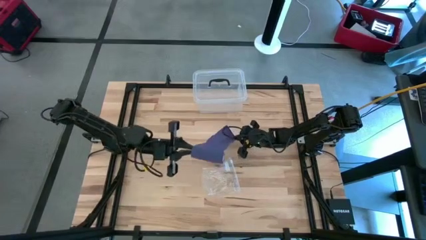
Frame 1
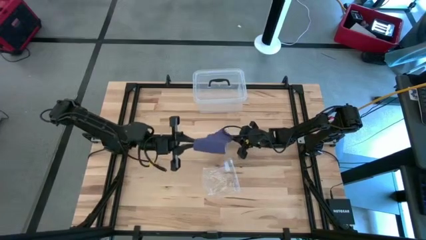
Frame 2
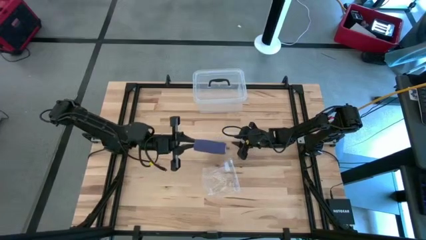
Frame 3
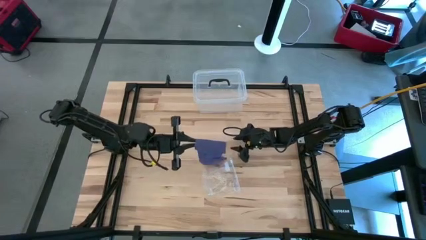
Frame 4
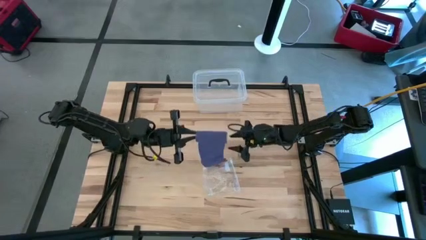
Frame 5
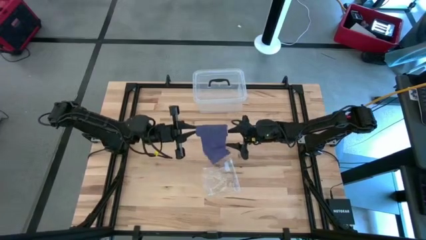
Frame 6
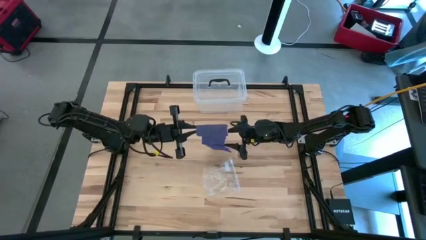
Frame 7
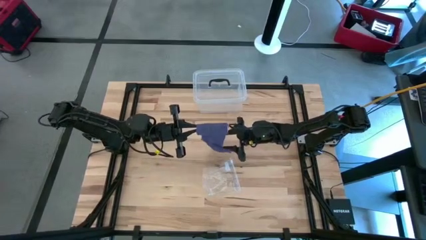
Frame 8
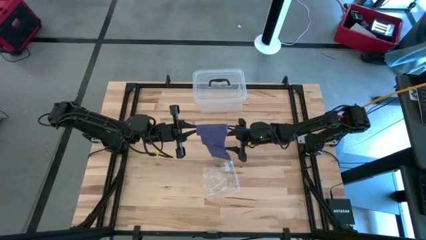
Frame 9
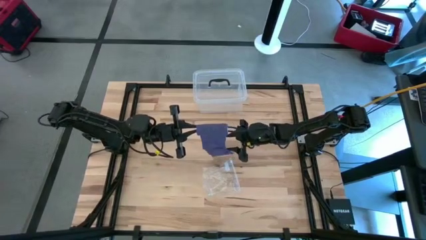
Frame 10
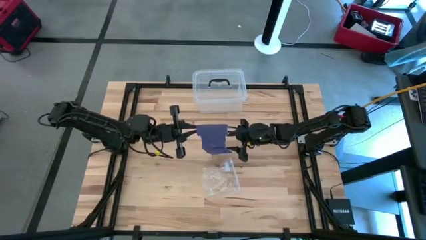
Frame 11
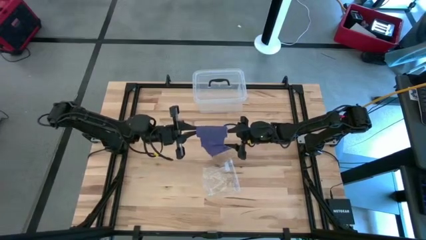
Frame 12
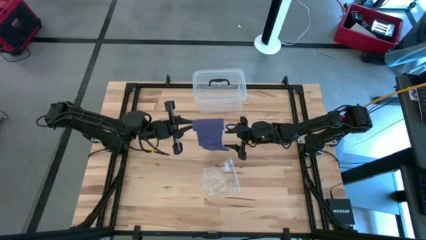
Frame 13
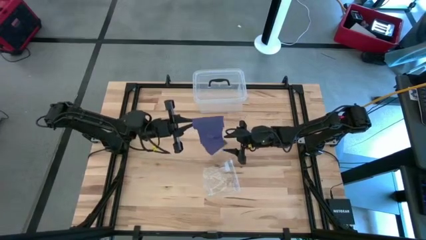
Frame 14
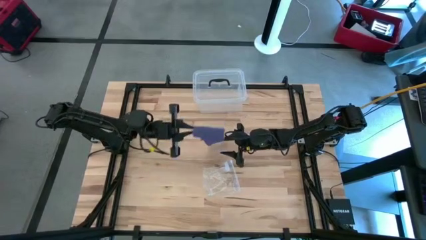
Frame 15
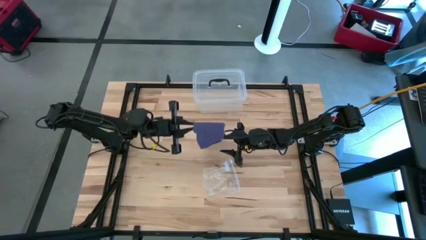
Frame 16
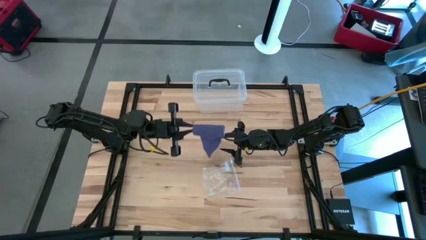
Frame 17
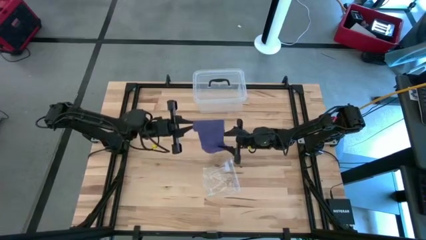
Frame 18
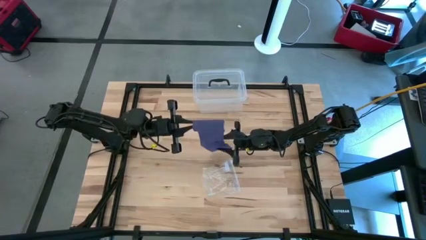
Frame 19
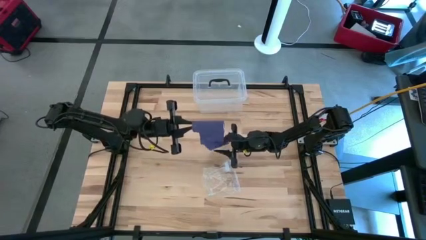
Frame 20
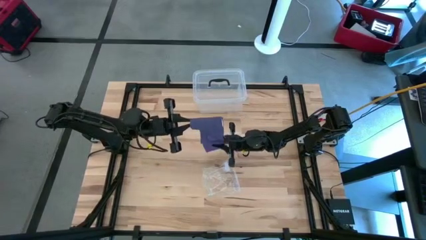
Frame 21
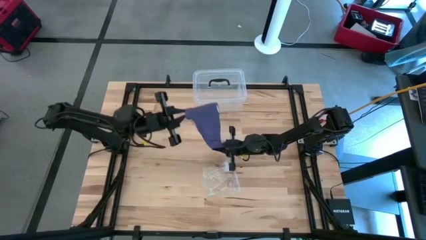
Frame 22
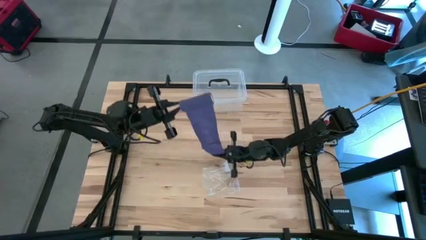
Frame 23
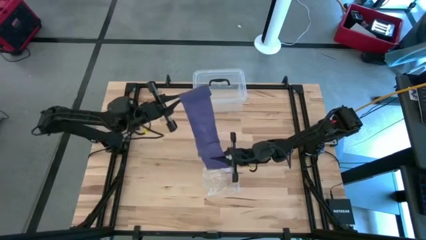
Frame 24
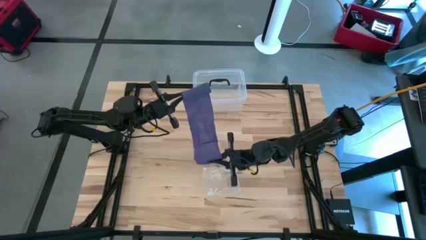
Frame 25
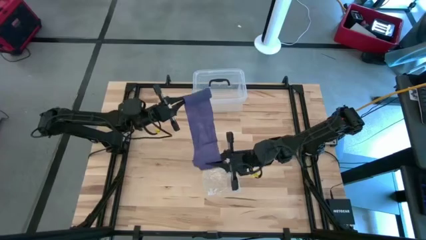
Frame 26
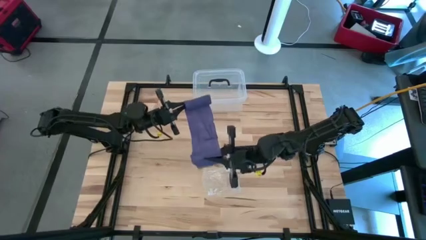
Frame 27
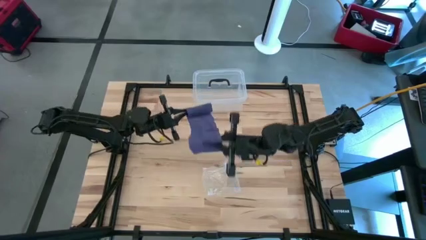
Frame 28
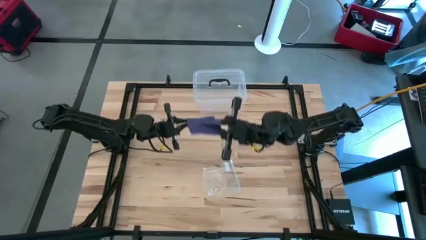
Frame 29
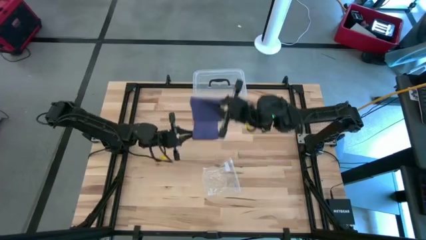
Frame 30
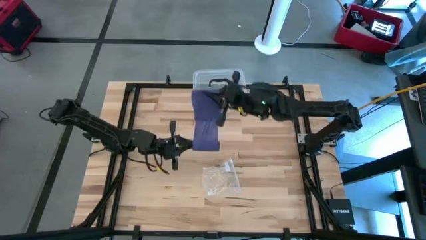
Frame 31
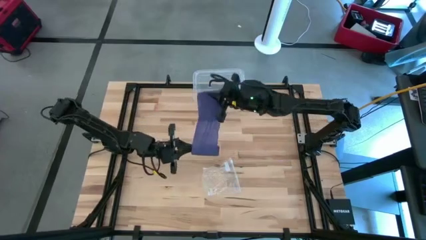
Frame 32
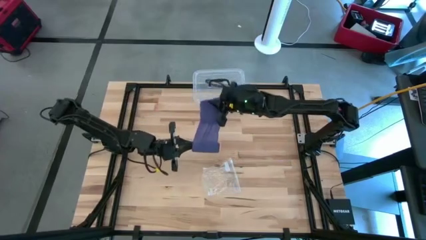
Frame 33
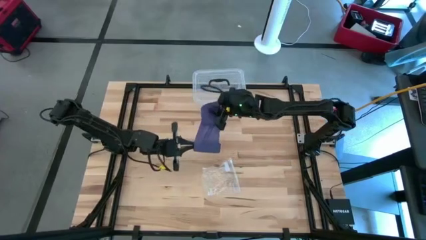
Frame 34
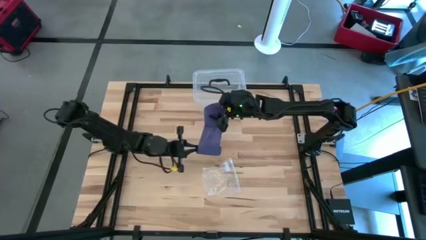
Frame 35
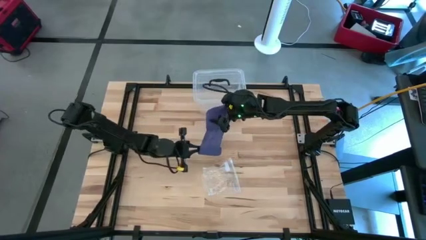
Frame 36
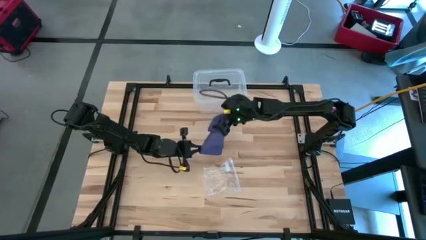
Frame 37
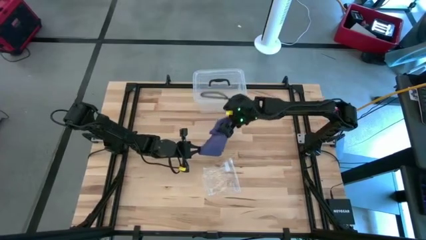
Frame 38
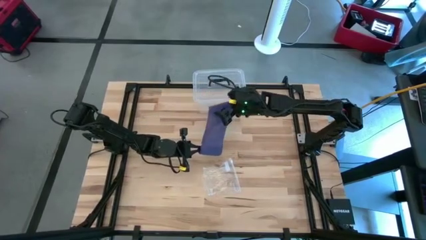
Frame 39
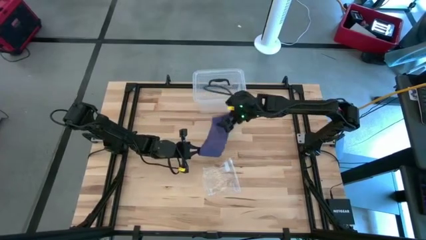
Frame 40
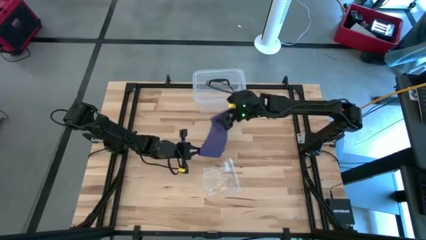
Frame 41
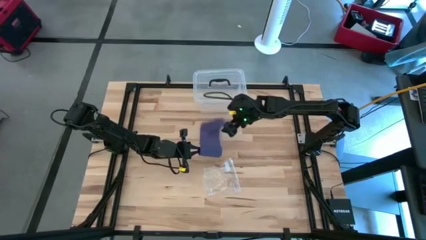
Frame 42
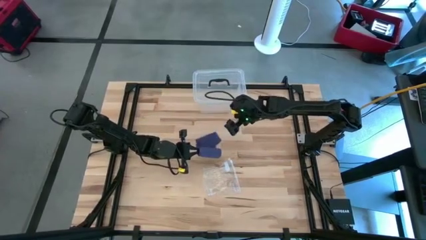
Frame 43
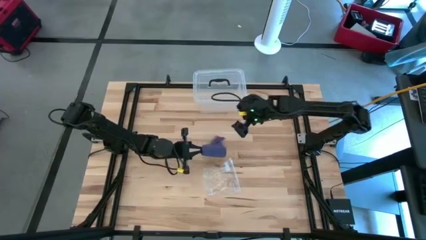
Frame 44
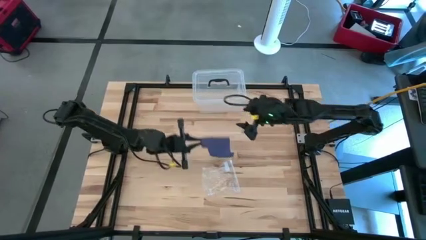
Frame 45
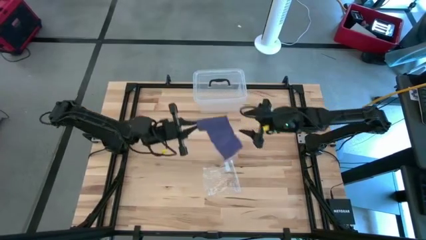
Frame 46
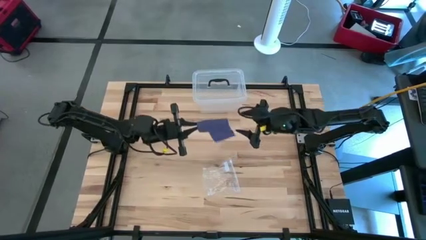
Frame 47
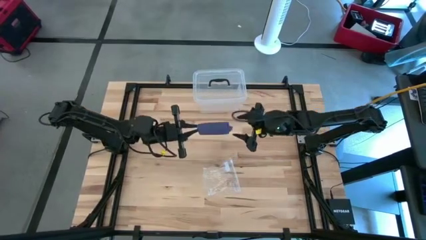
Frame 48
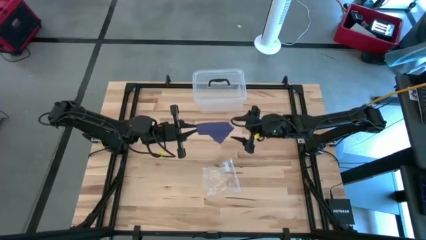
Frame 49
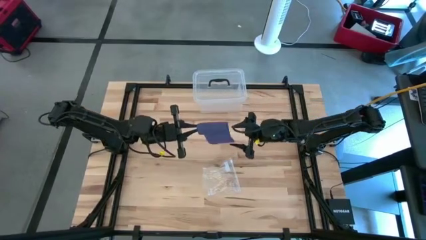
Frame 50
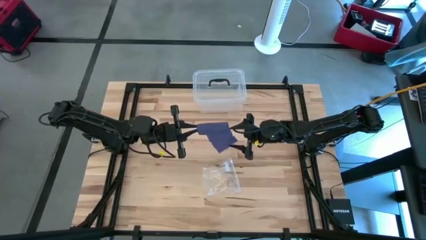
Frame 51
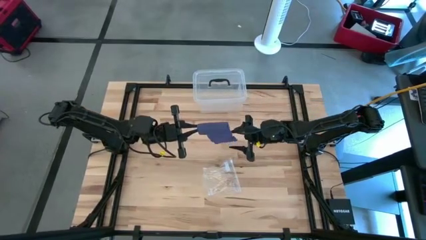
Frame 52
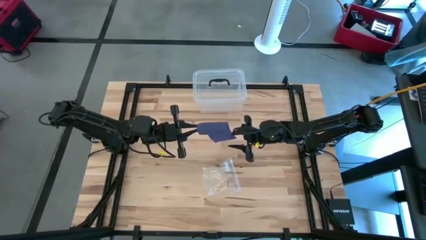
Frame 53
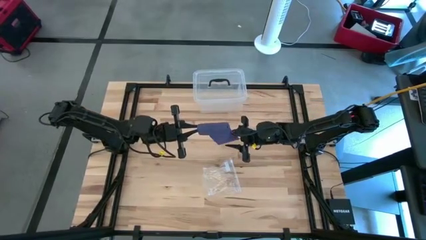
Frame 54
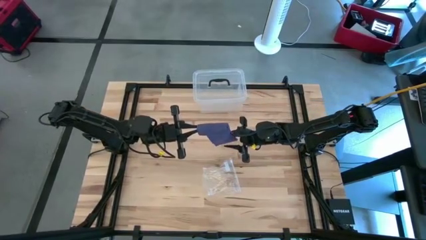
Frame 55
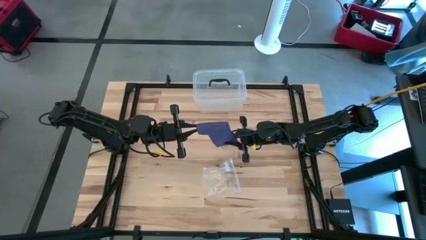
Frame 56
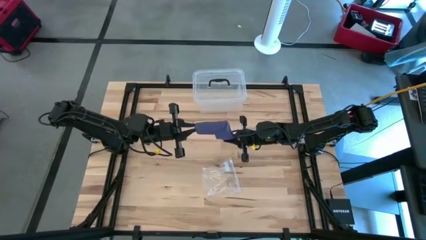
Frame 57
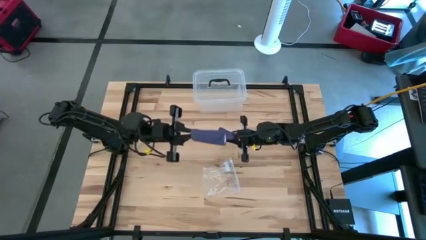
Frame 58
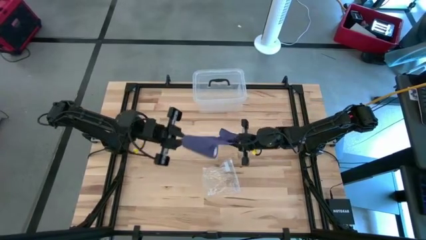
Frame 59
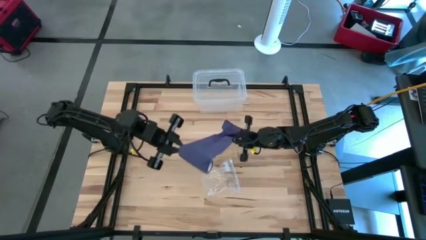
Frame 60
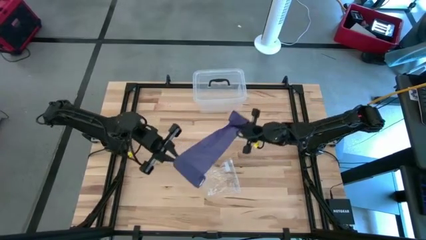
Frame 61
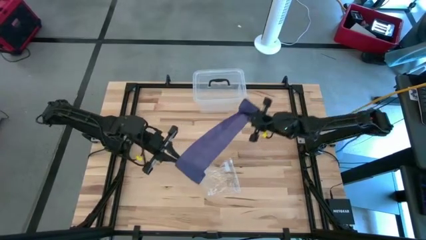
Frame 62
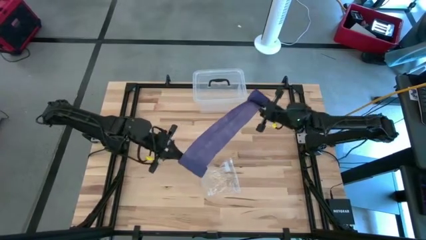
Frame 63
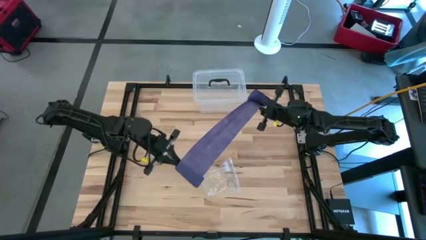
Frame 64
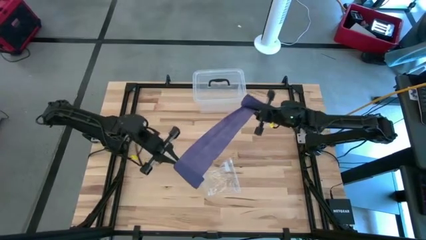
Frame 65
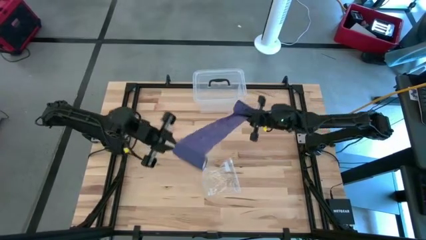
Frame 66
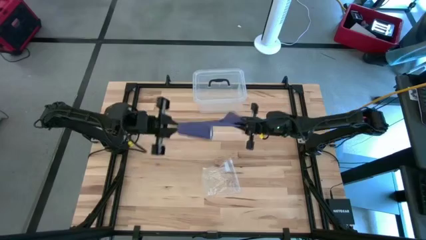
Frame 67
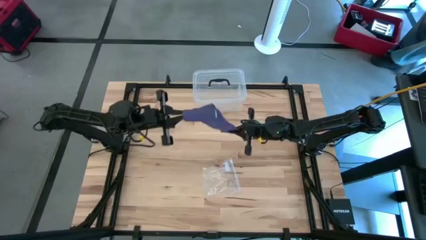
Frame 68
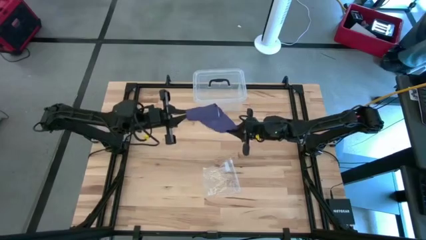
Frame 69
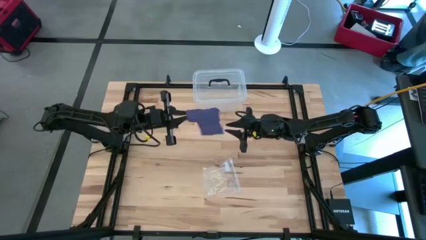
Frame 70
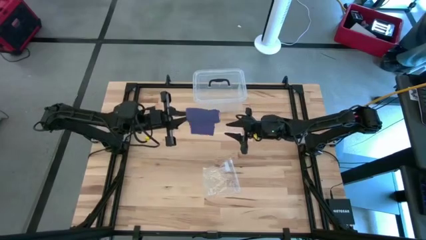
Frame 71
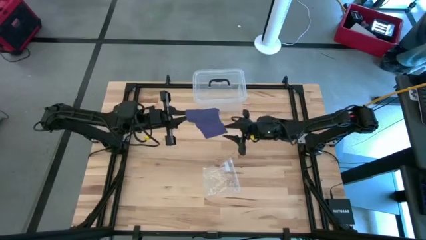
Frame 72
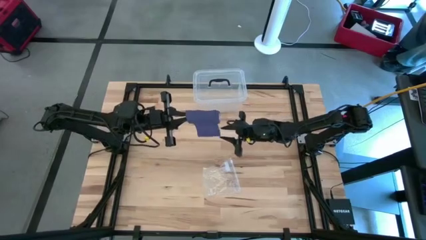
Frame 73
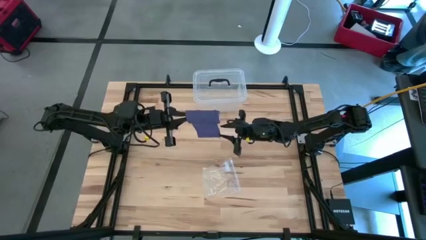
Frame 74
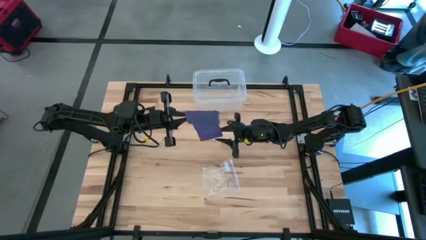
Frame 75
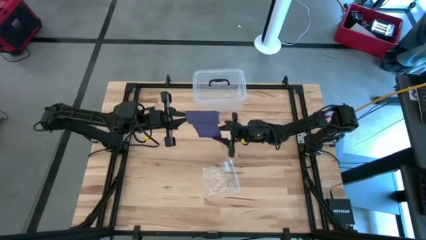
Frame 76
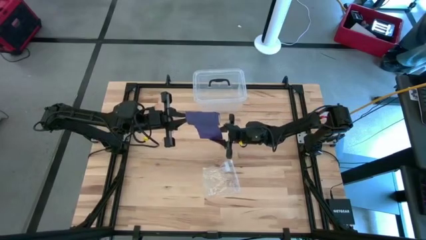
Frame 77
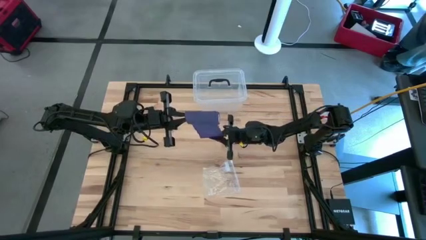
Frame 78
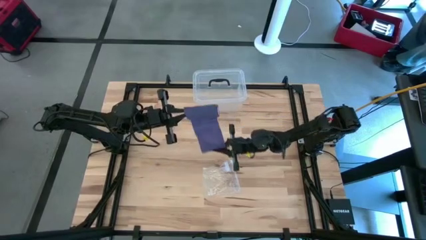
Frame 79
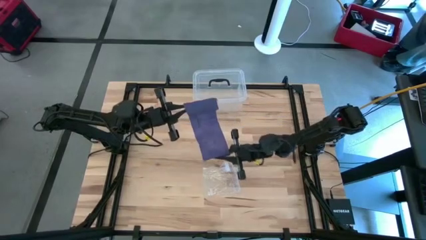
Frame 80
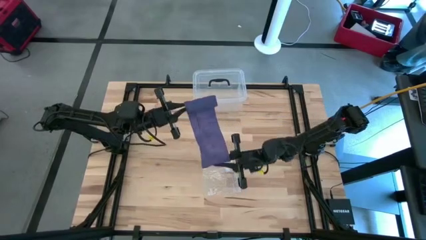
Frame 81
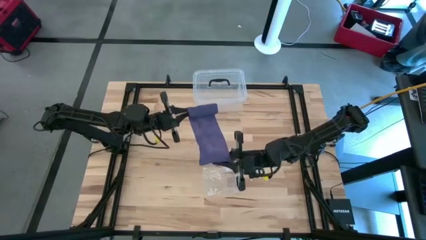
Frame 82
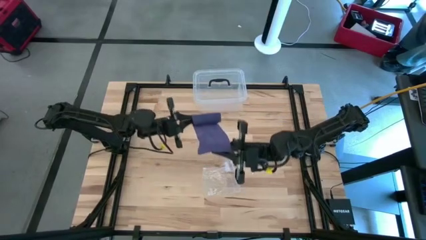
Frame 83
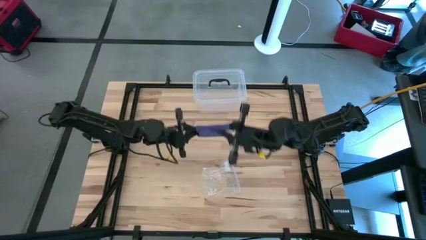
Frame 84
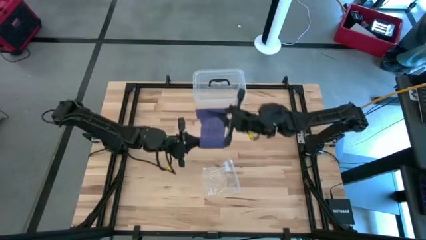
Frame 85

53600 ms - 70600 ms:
Task: Roll bandage
Roll the violet bandage
